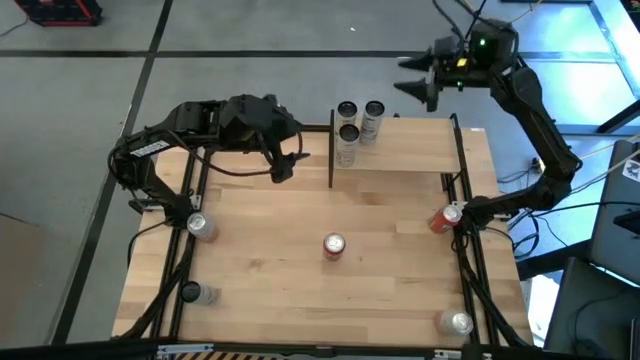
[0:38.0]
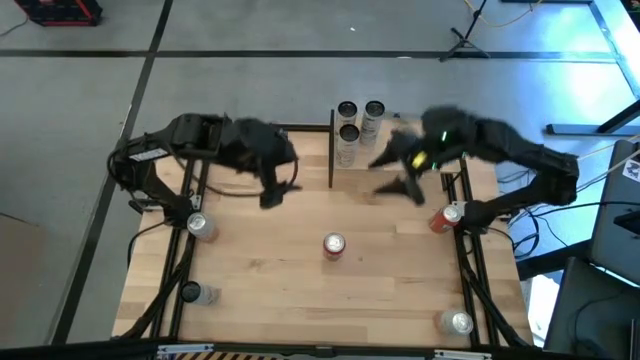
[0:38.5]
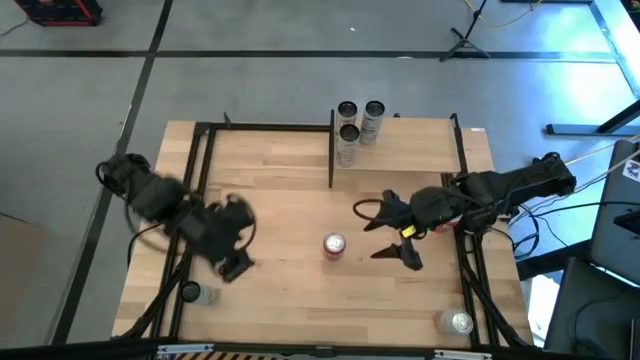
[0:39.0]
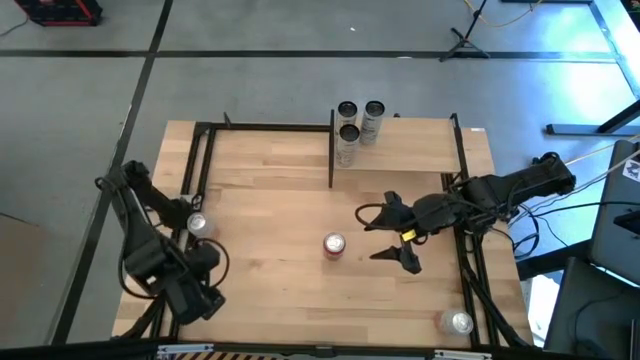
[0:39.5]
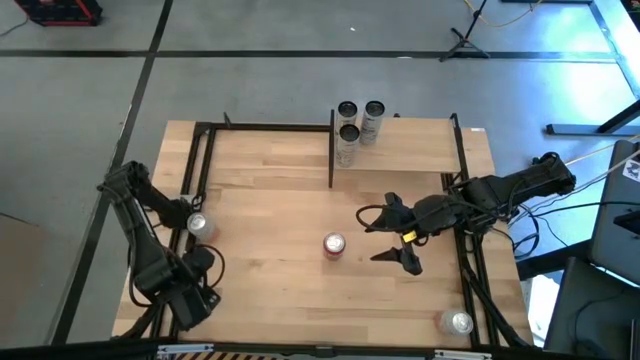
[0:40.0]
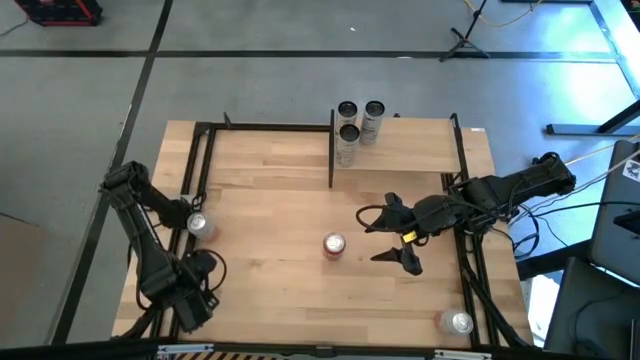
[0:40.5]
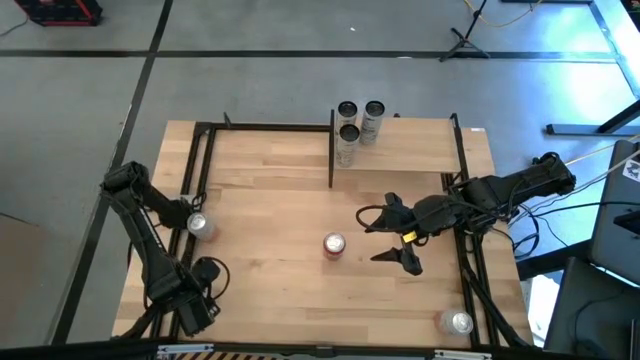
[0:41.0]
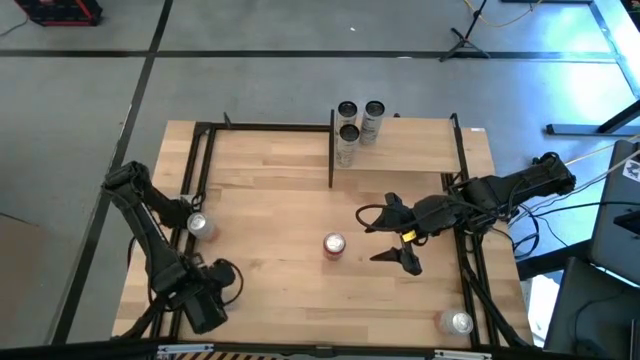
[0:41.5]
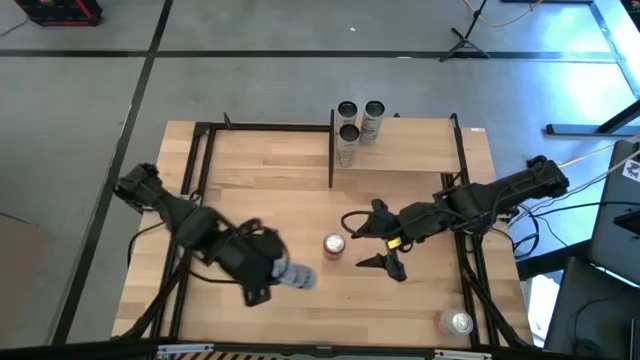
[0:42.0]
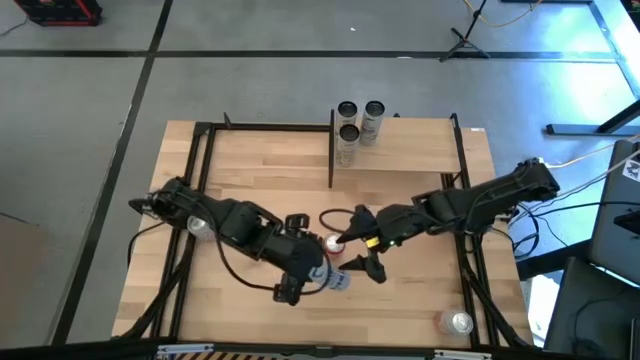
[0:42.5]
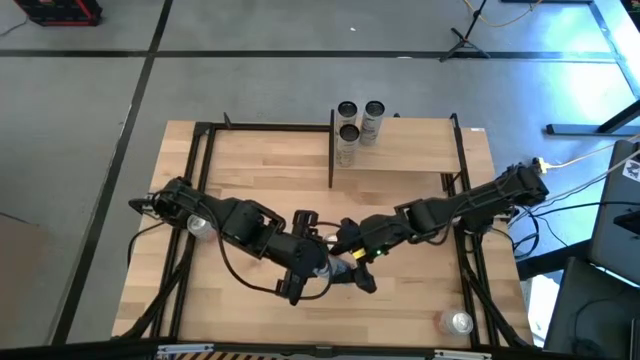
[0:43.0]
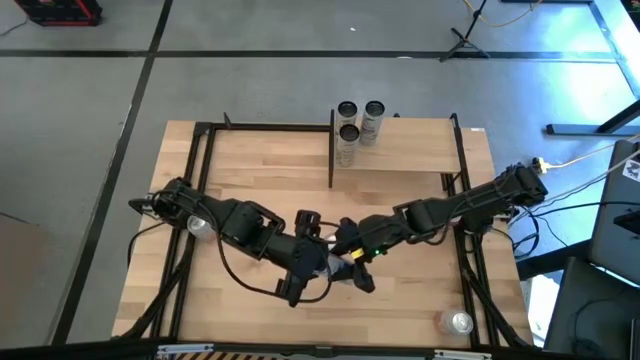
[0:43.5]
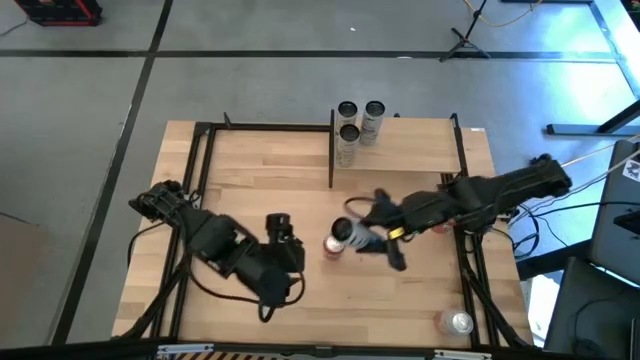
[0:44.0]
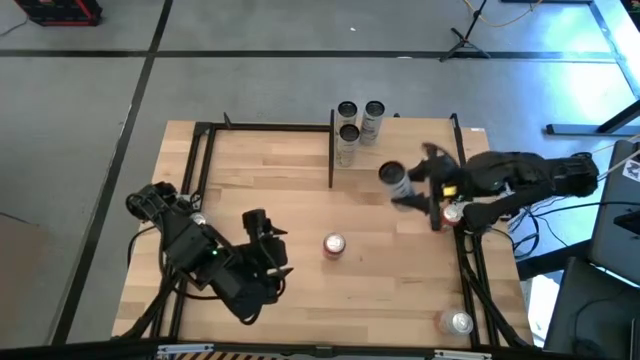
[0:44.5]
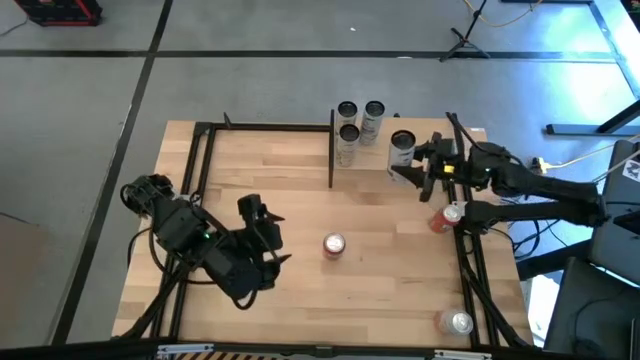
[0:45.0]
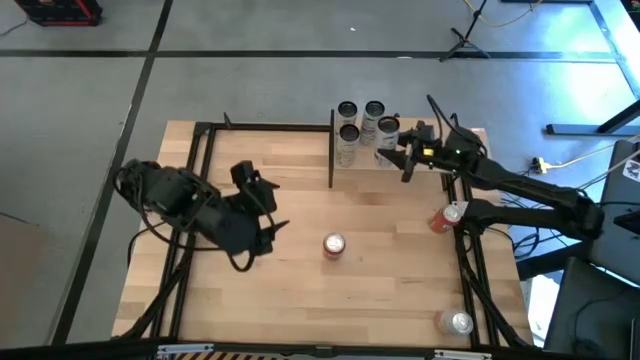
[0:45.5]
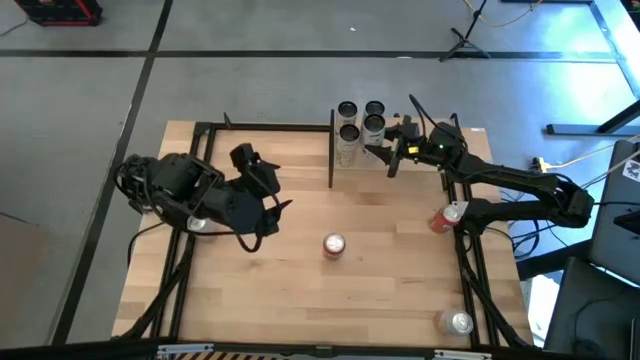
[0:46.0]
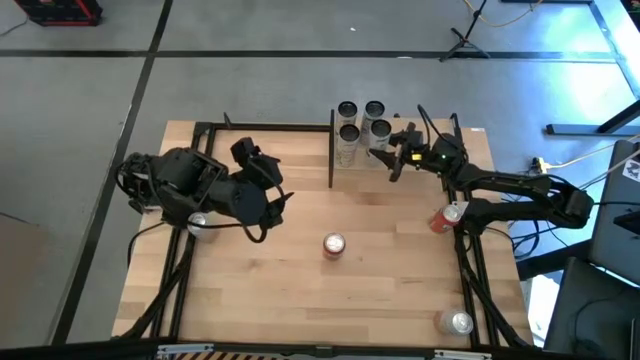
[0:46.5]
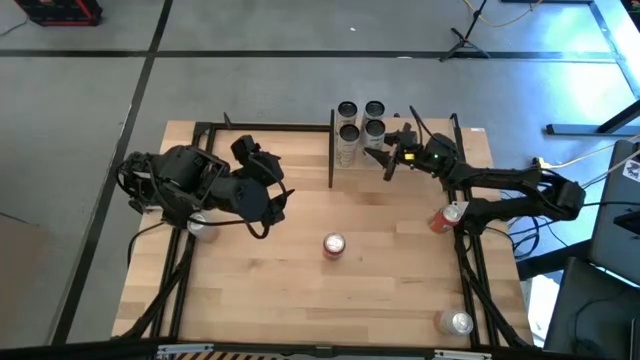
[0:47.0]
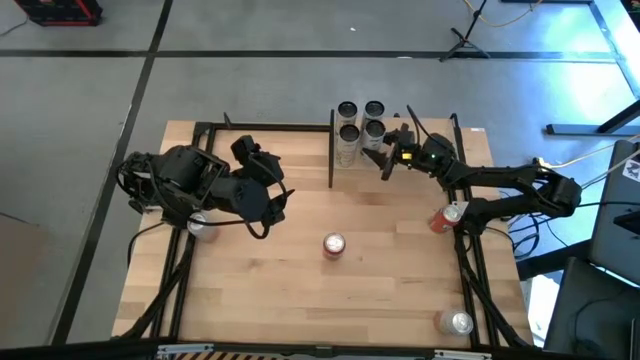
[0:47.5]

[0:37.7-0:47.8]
Task: Place canned beverage on shelf
Put the white blue soda can on the shelf aligned with the other white blue soda can

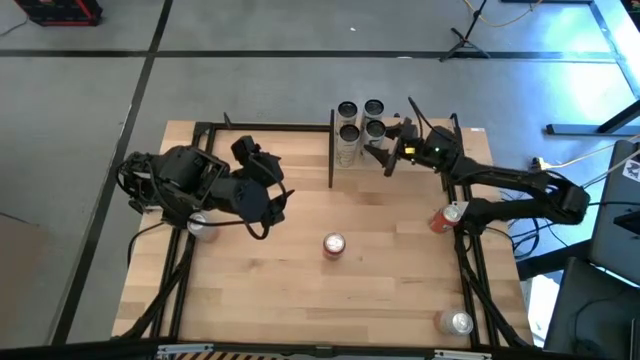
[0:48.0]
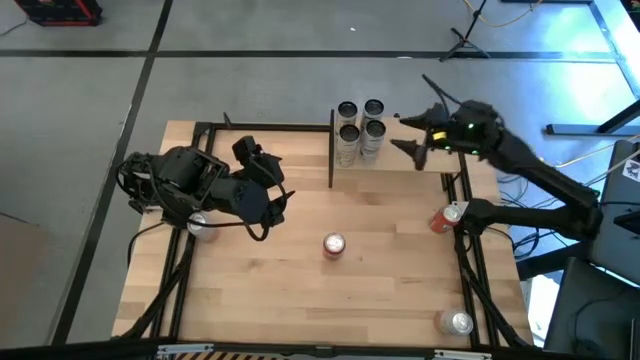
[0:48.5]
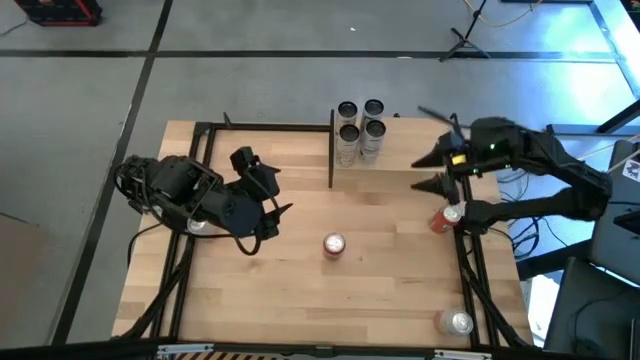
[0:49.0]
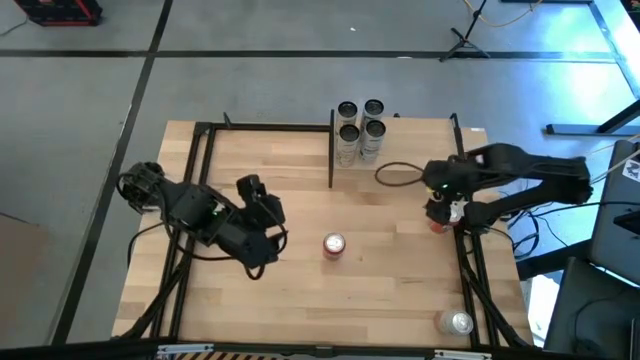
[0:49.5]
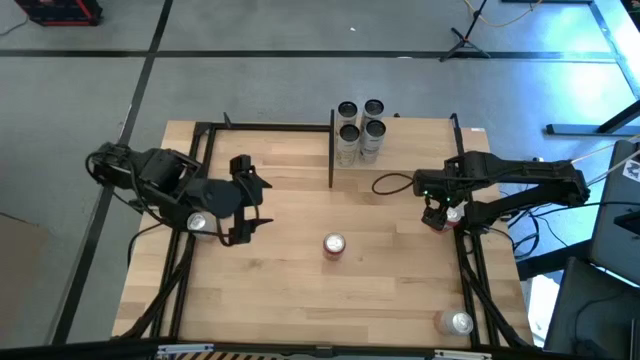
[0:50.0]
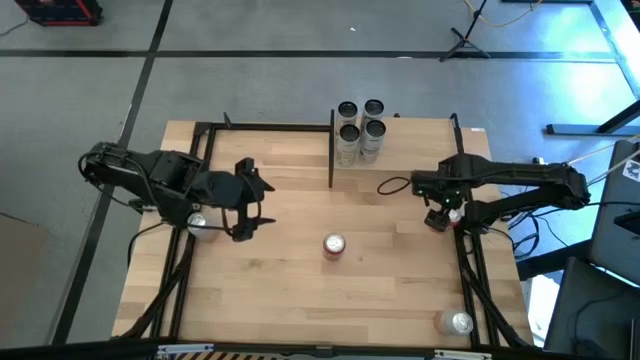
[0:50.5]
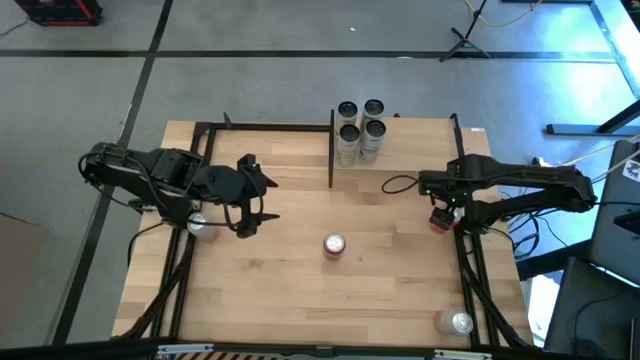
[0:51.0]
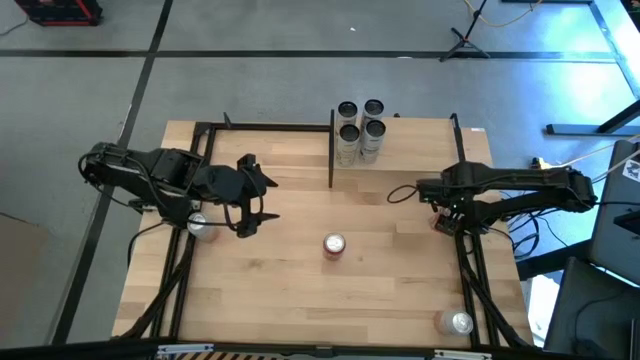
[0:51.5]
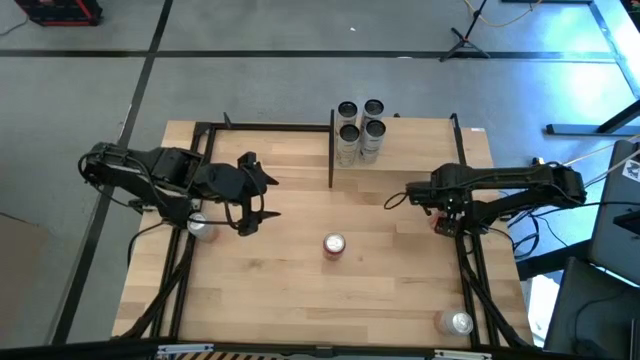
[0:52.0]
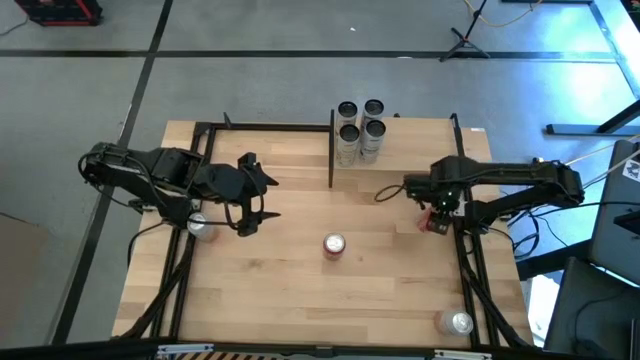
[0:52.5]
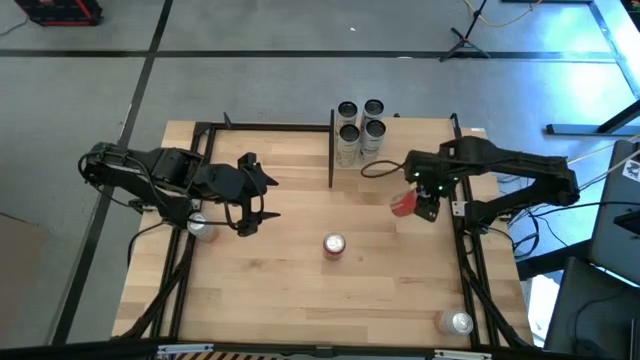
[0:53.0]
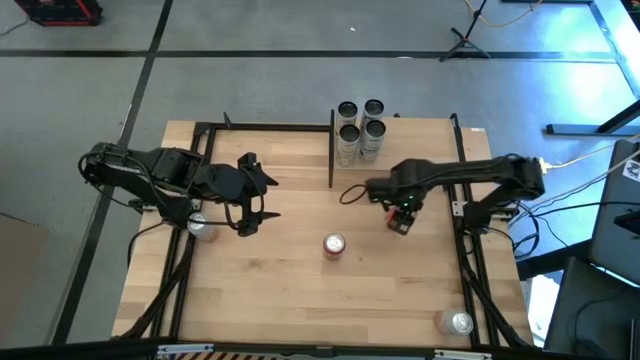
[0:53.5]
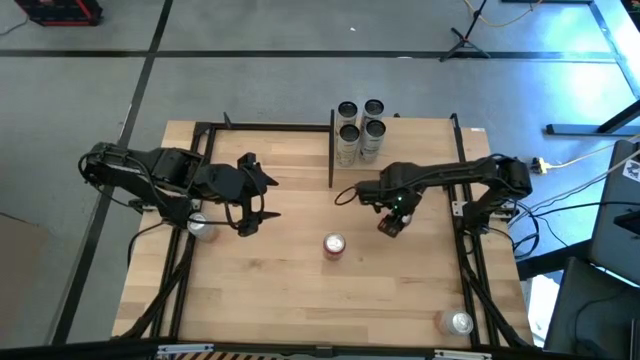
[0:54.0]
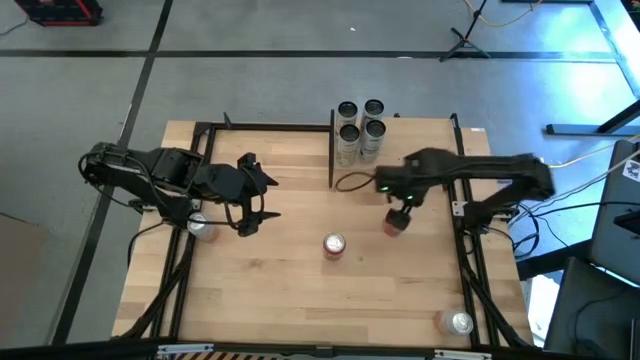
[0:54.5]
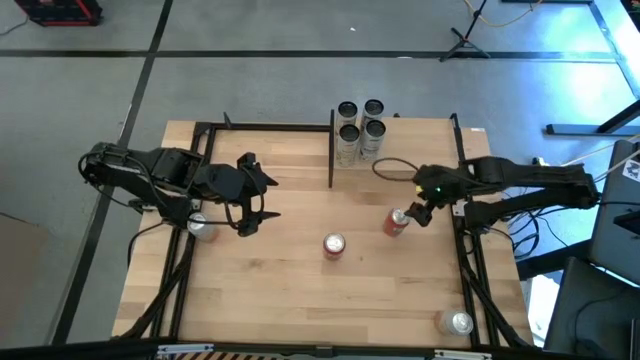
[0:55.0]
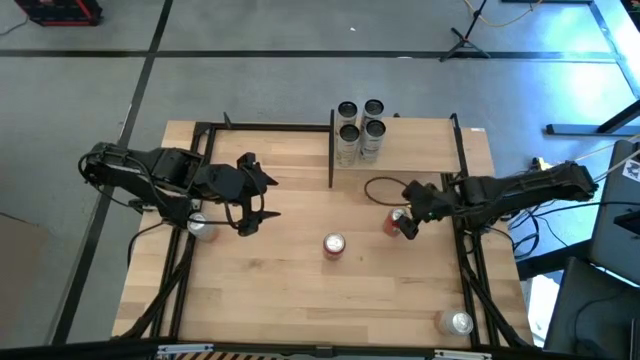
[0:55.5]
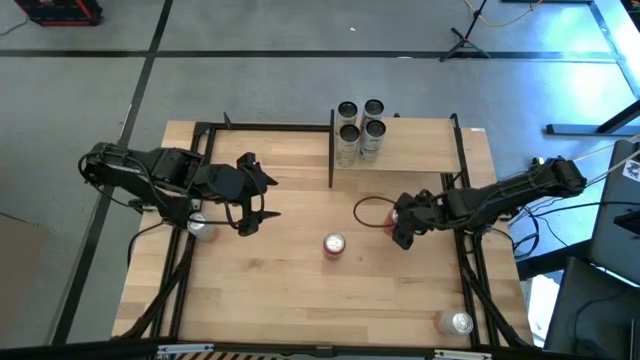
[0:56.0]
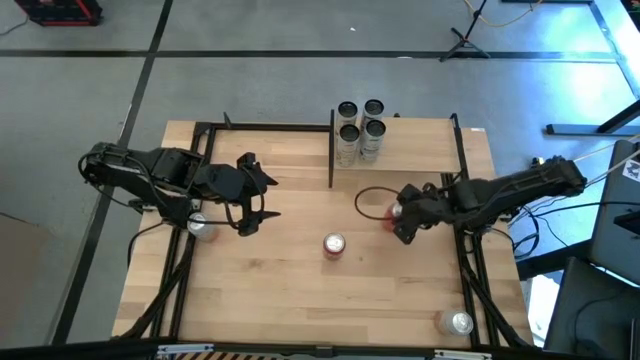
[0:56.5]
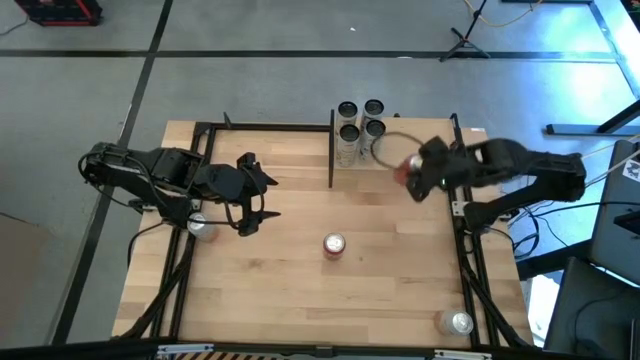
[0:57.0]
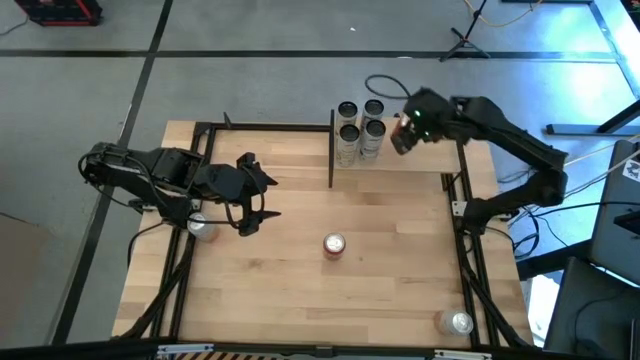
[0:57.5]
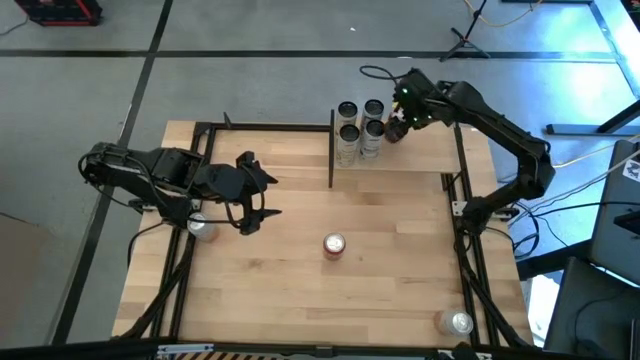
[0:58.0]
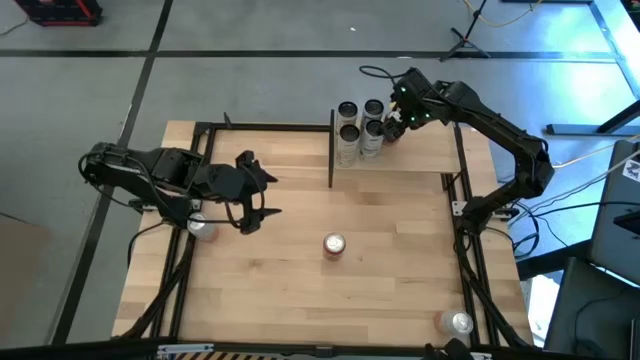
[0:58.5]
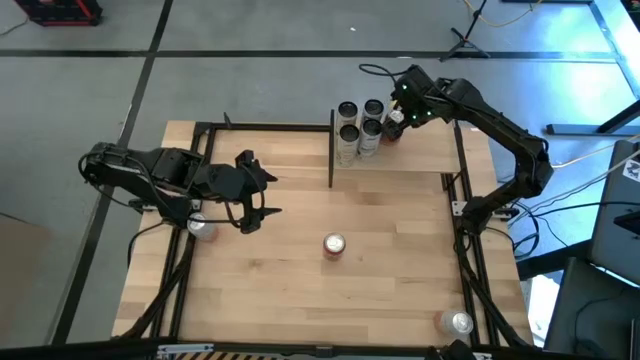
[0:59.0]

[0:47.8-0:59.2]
Put the right red soda can on the shelf

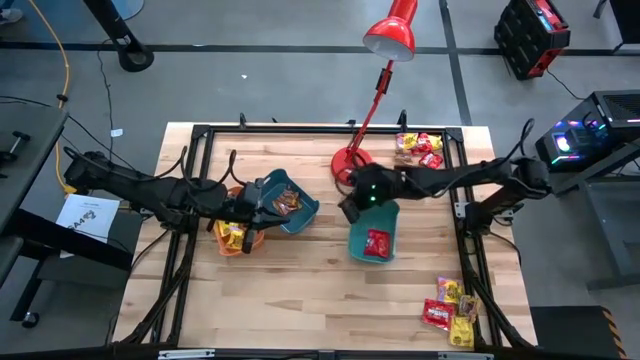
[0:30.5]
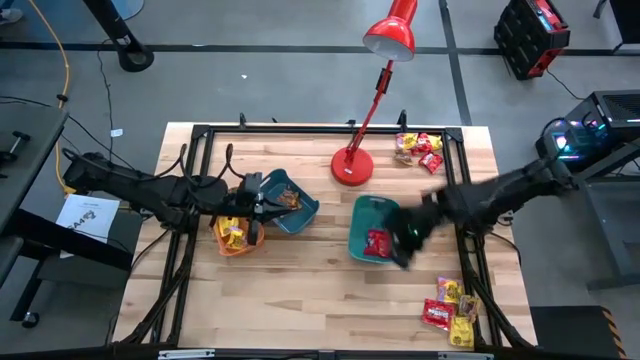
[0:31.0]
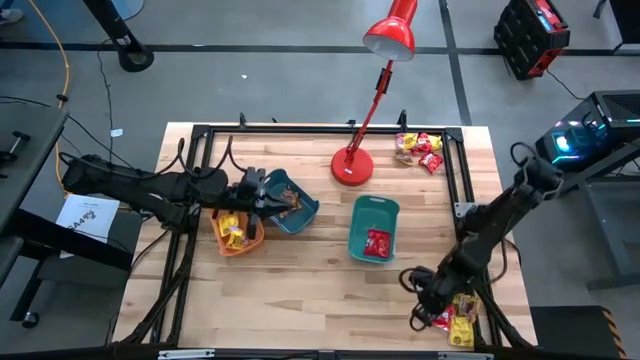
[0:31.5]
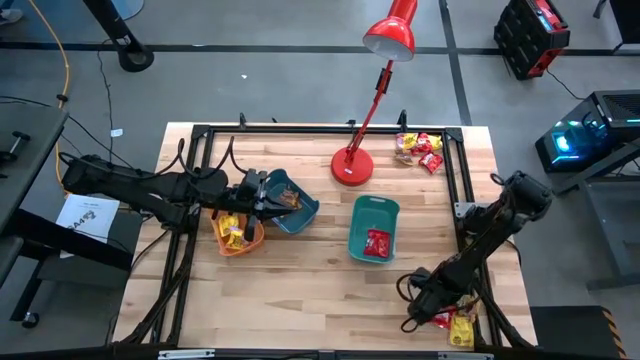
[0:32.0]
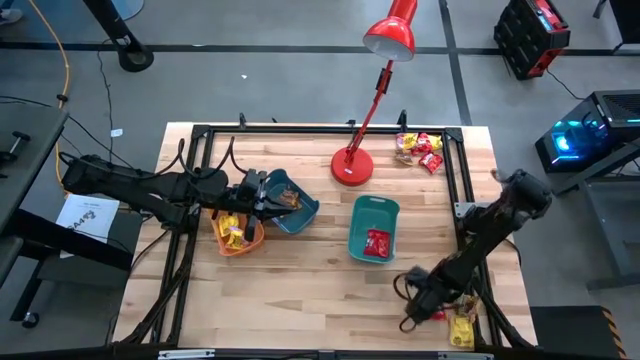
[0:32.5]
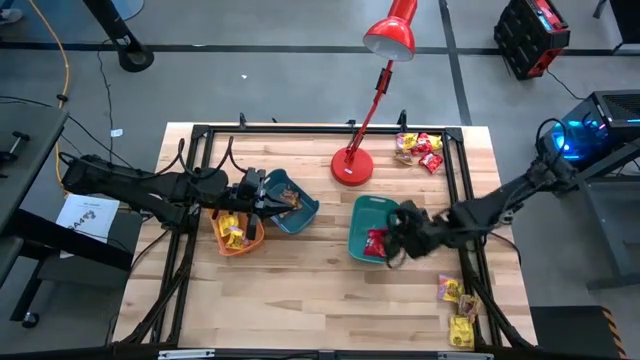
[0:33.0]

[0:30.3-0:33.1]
Task: Sort candy
Put the bottom right red candy into the light blue bin
